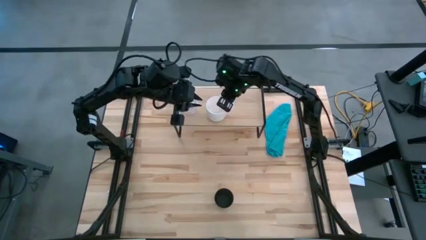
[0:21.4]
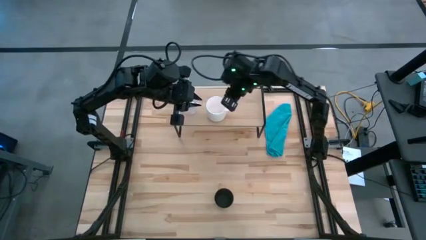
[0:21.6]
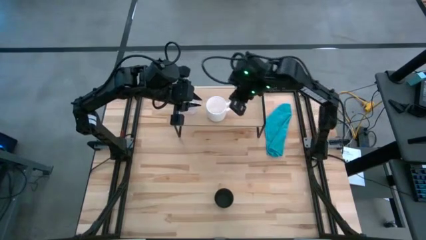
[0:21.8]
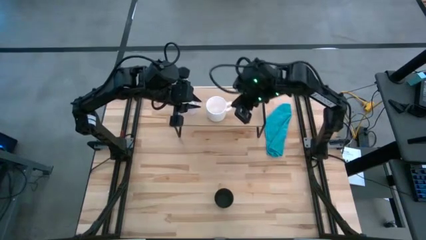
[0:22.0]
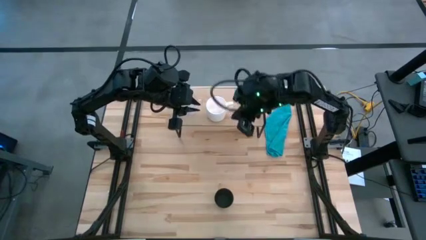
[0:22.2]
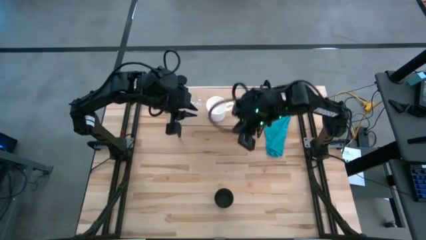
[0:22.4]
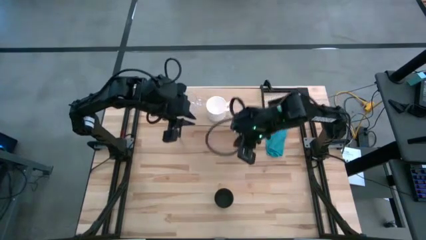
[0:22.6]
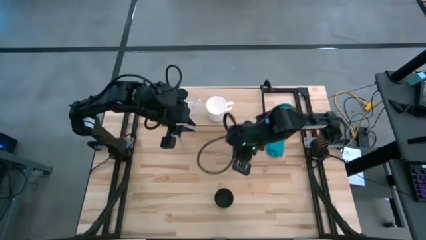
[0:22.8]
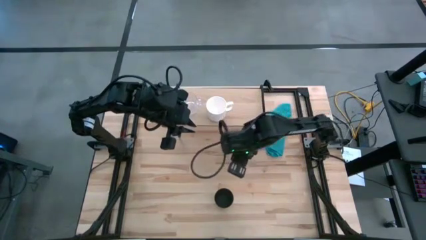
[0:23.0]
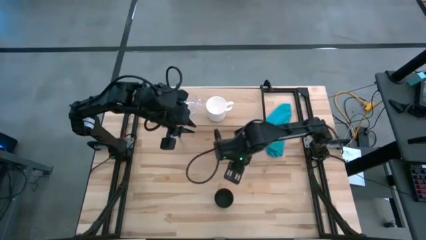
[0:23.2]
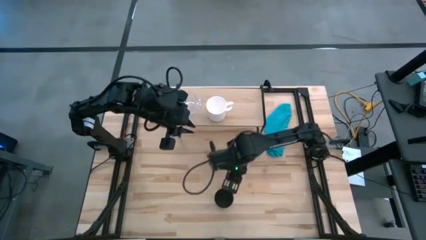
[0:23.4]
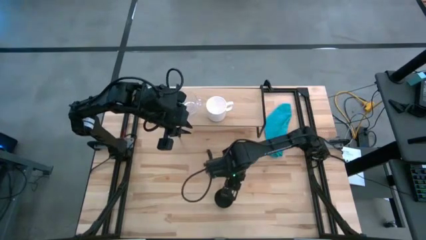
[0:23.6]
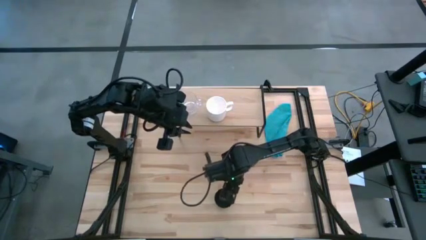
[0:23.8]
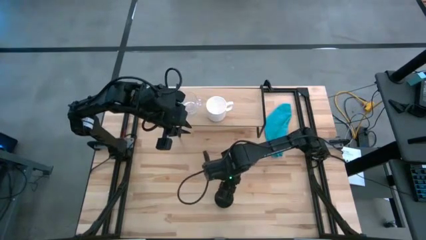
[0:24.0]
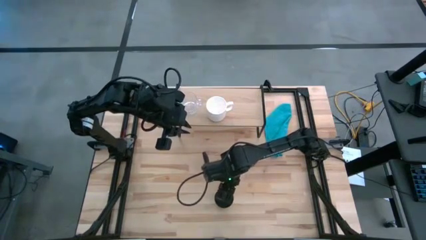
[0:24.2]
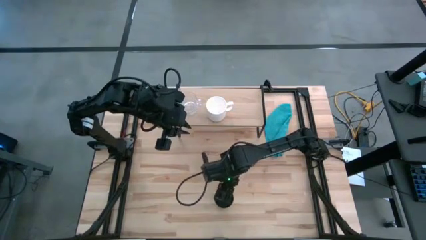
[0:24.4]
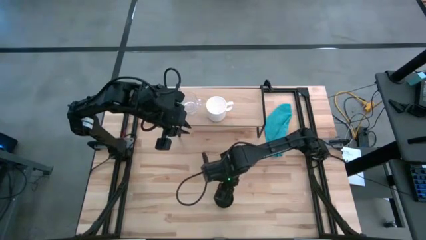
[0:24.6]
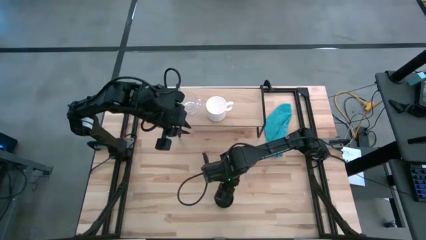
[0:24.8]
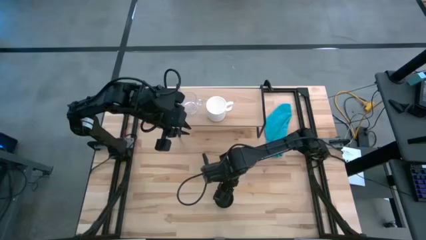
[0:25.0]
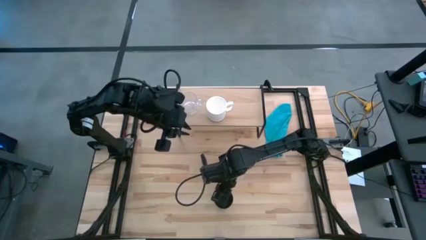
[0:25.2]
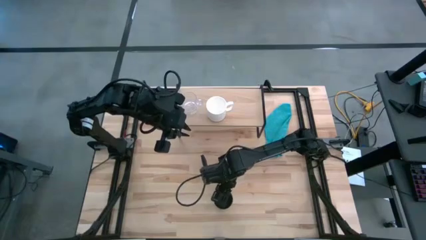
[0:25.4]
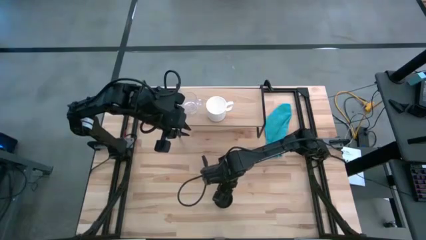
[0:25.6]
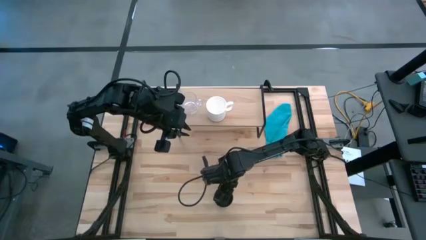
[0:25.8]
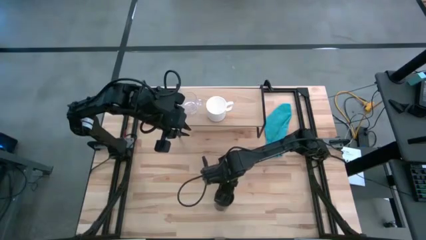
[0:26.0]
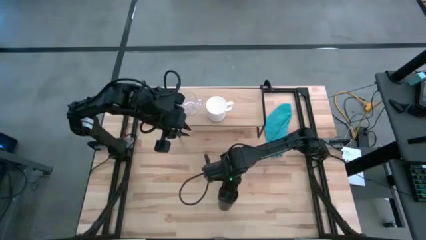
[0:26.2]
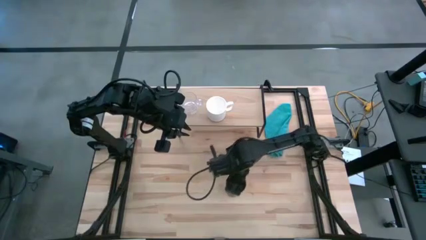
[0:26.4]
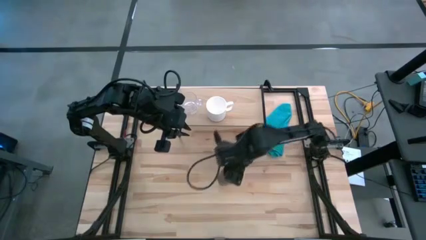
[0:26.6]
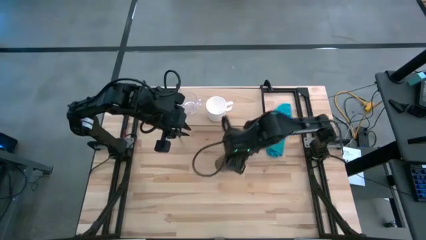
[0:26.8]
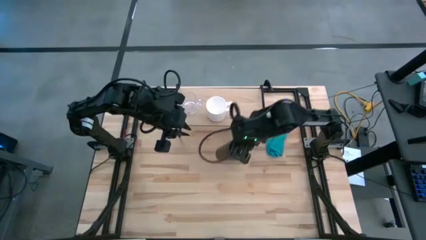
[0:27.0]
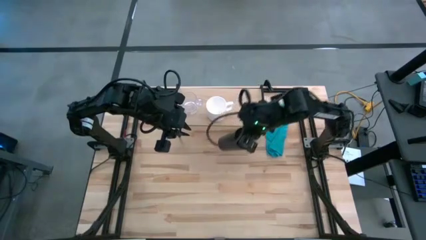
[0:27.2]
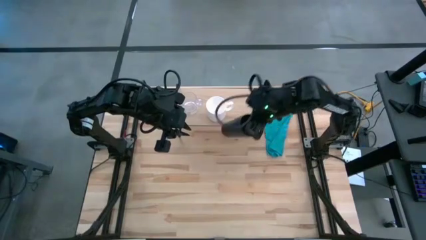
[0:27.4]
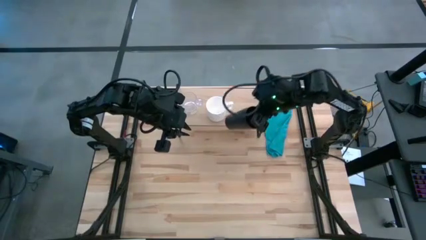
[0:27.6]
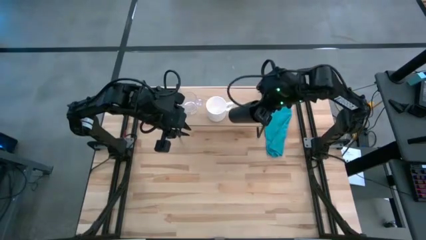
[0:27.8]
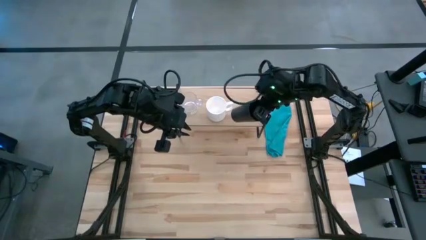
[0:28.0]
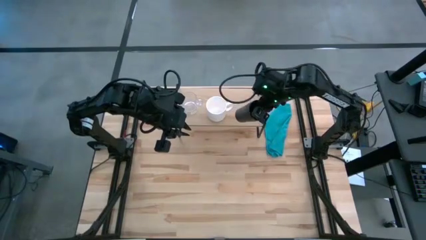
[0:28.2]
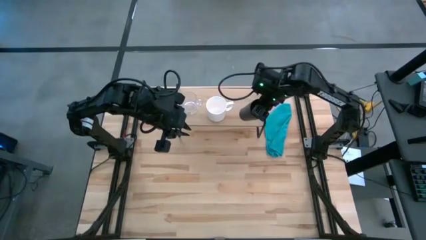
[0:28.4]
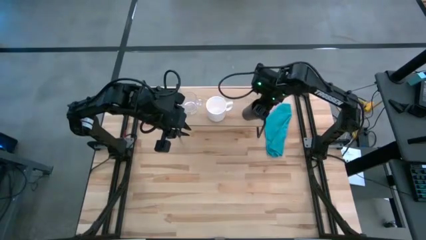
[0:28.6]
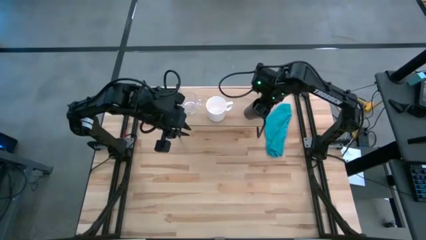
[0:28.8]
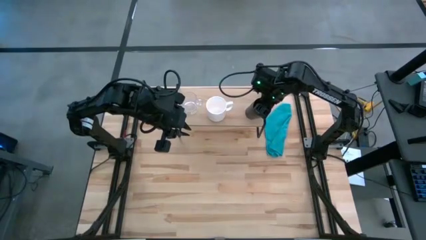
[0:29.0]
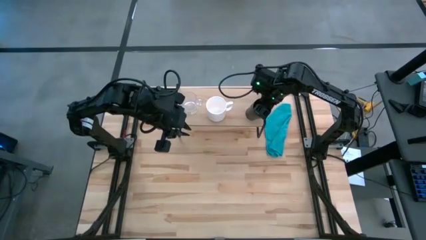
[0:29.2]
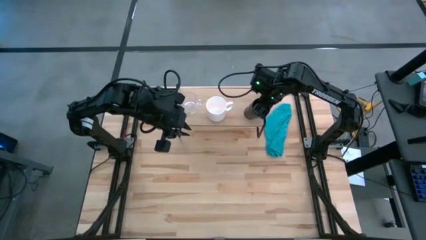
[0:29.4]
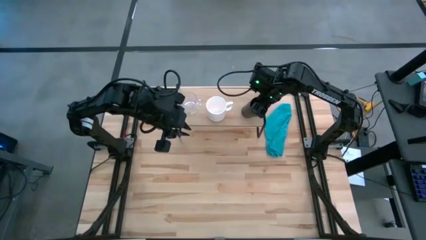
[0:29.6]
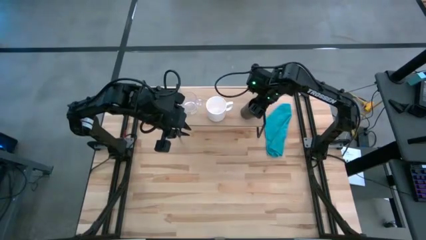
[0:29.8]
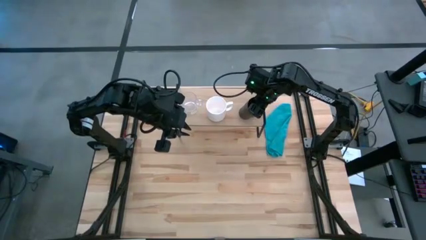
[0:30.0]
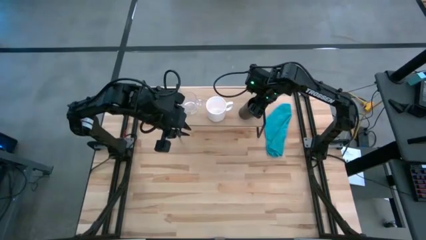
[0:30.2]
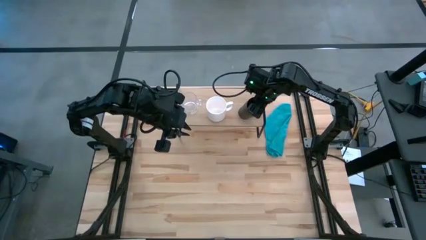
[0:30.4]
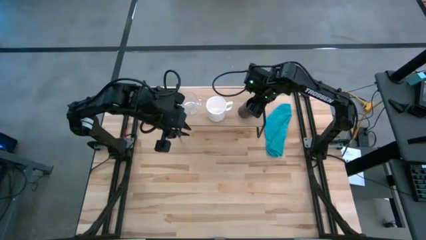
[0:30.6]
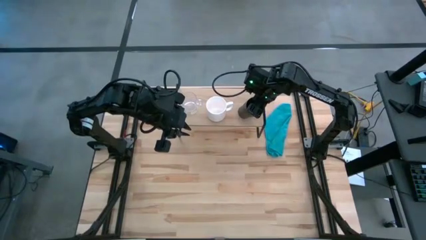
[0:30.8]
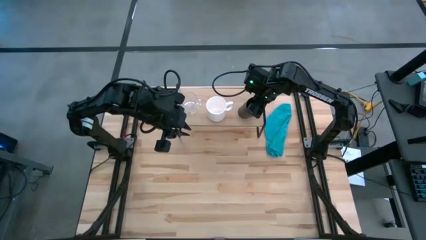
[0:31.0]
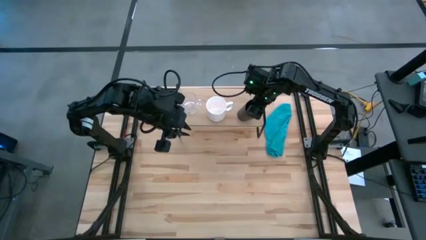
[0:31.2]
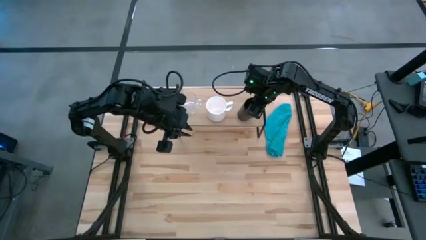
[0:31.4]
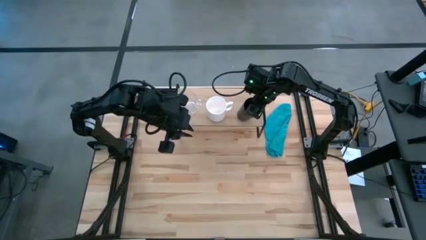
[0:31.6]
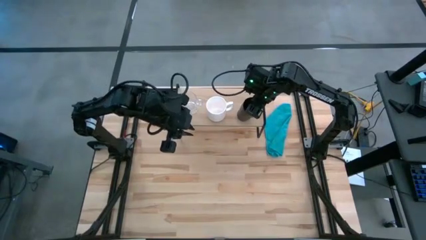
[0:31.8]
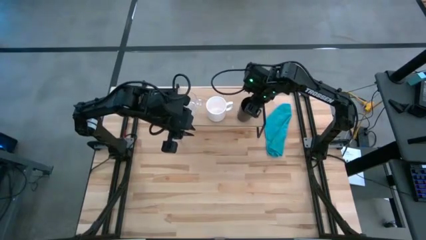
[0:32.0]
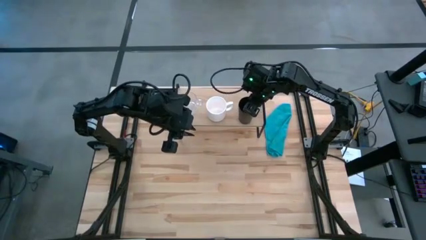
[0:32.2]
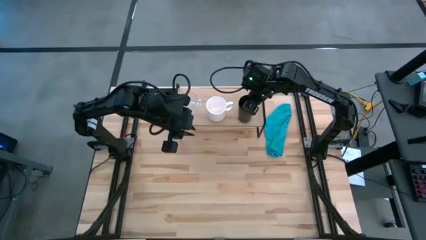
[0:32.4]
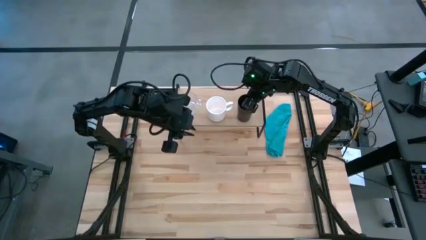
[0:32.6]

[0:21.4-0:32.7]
Task: Stack small to large cups/mugs on shelf
Put the black glass on the shelf

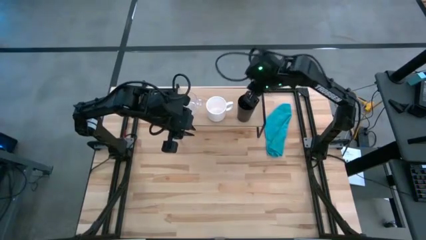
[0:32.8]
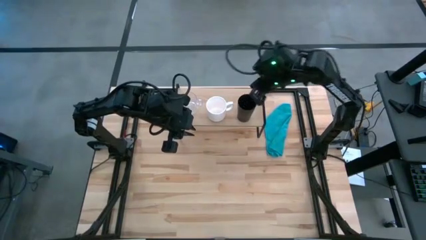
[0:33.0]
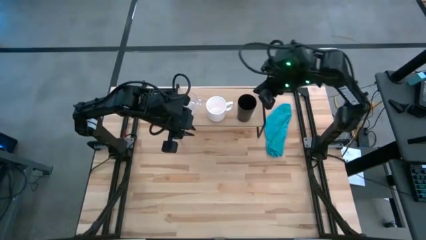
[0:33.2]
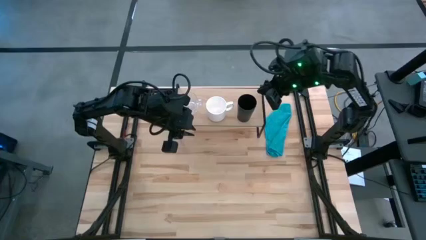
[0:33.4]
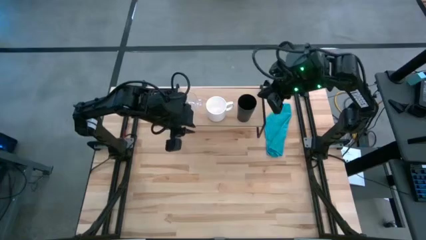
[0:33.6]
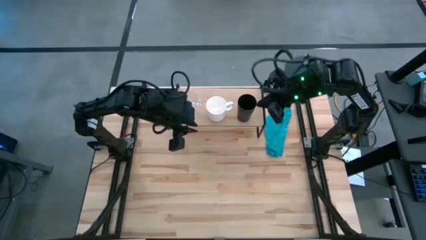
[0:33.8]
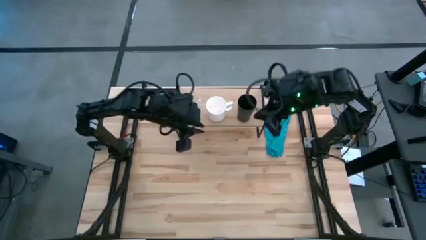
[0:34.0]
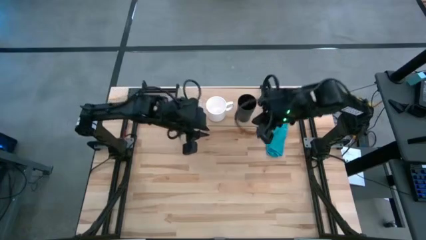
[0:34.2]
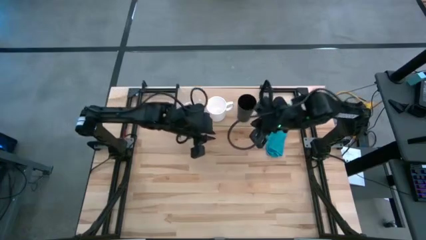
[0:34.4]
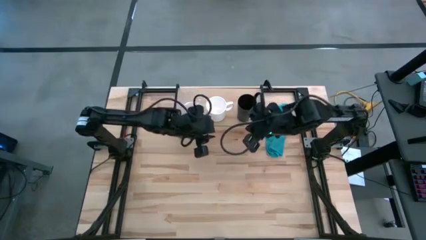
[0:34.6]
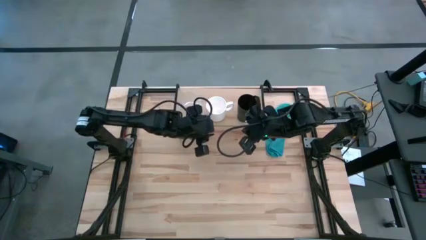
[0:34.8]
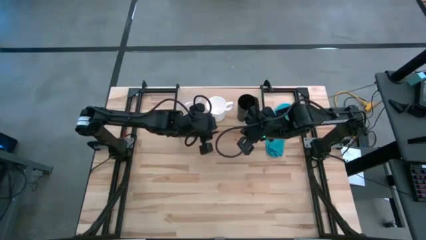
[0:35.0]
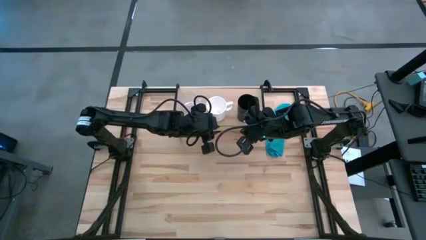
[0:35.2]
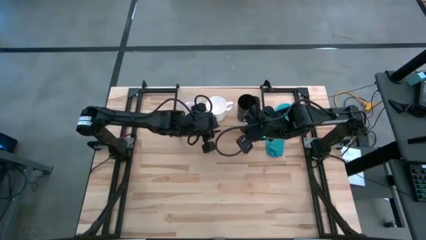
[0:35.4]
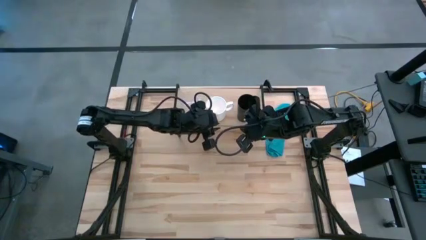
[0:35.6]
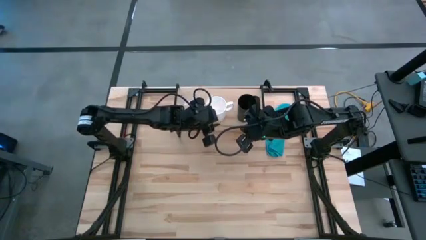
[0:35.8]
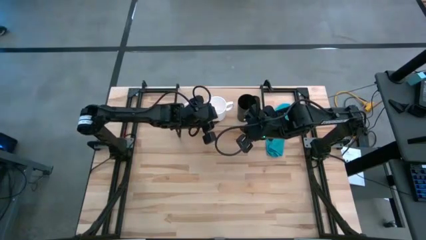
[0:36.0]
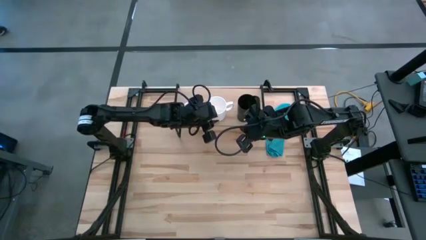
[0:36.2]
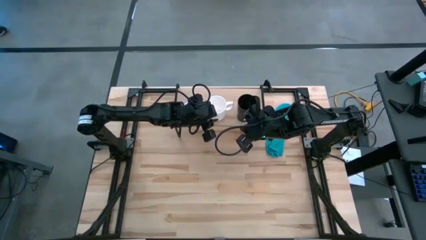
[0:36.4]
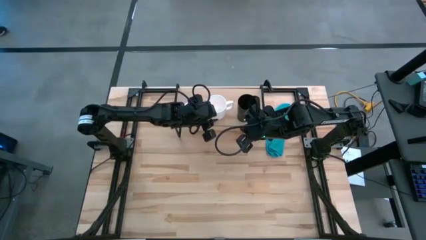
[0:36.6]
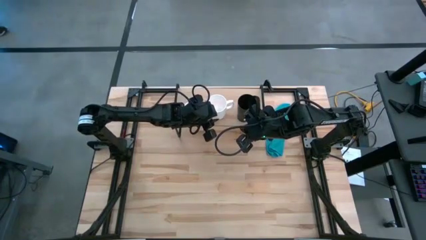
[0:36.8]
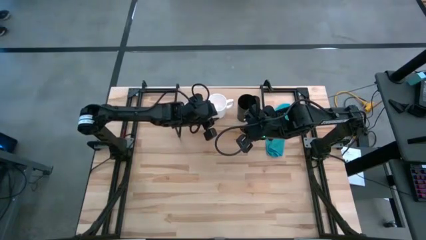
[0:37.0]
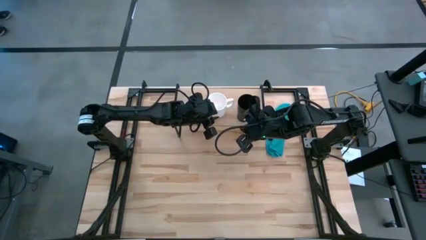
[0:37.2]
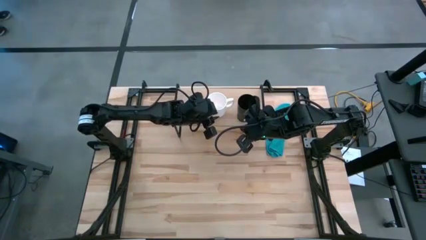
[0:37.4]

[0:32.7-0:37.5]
Adjust the white mug on the shelf
